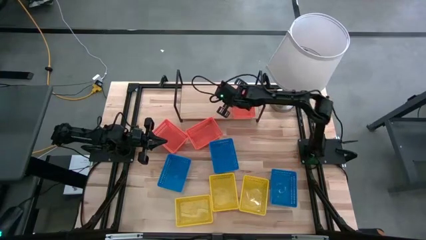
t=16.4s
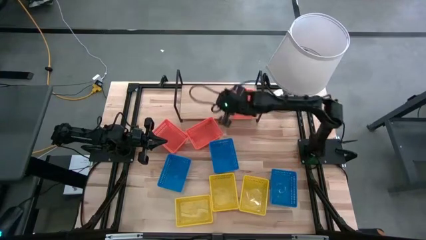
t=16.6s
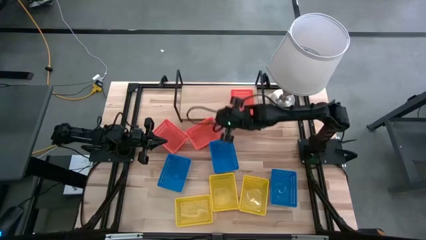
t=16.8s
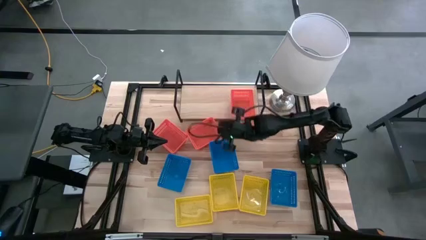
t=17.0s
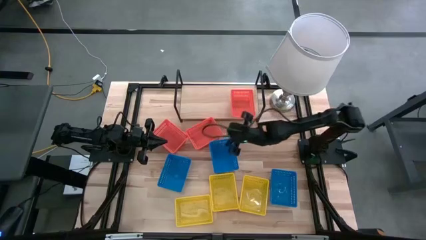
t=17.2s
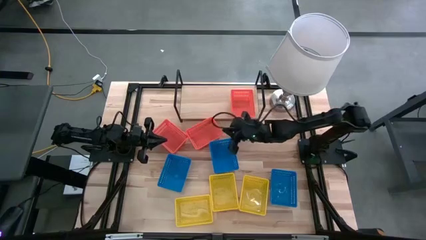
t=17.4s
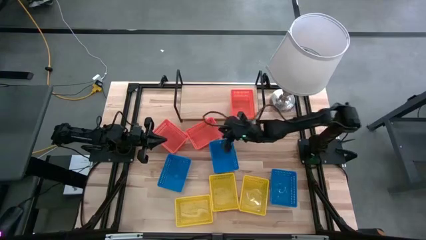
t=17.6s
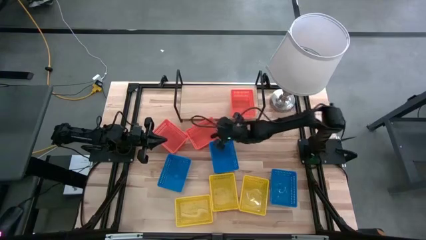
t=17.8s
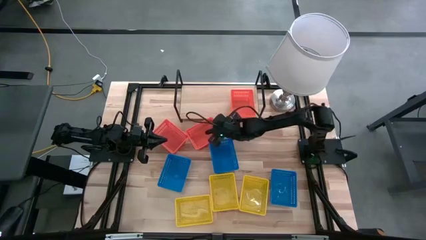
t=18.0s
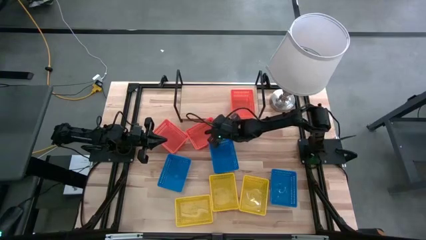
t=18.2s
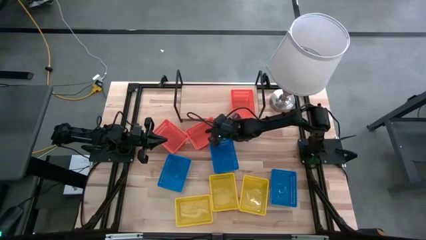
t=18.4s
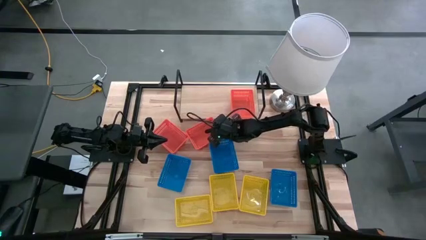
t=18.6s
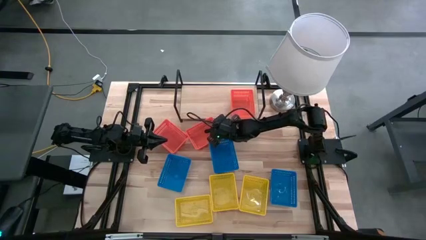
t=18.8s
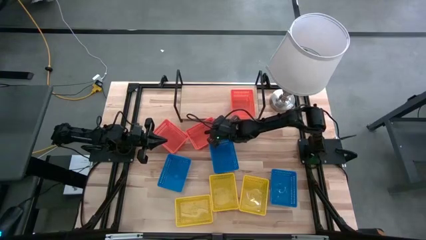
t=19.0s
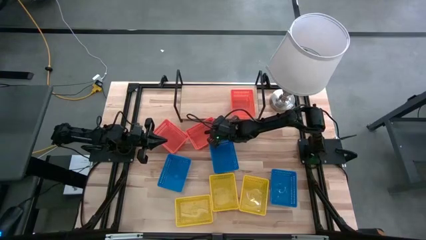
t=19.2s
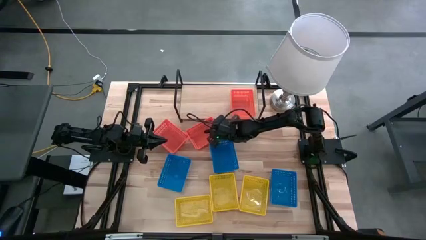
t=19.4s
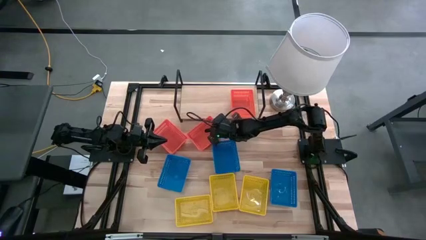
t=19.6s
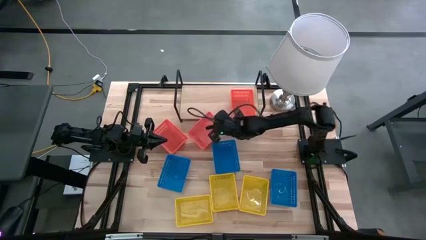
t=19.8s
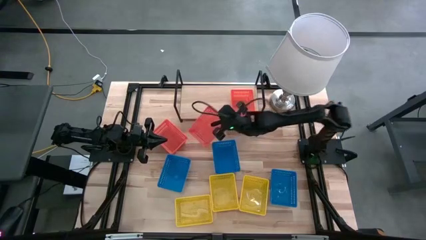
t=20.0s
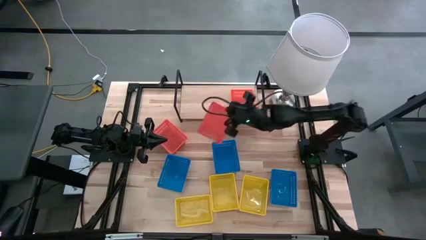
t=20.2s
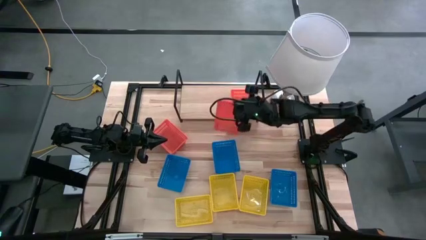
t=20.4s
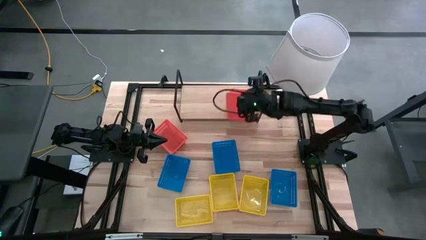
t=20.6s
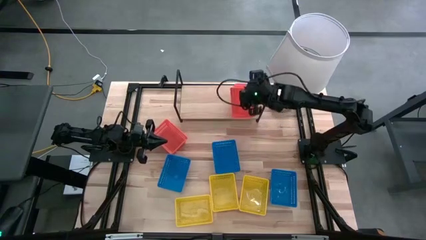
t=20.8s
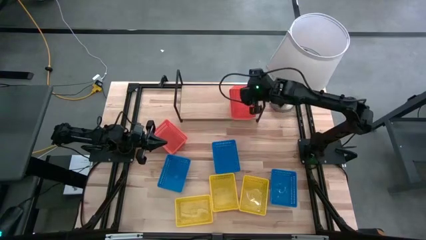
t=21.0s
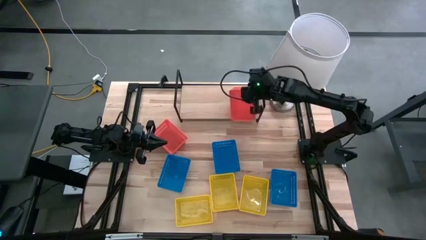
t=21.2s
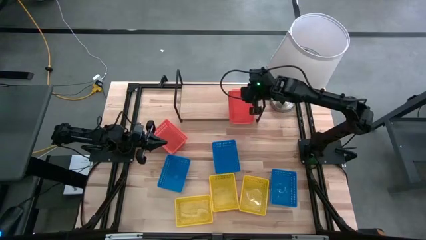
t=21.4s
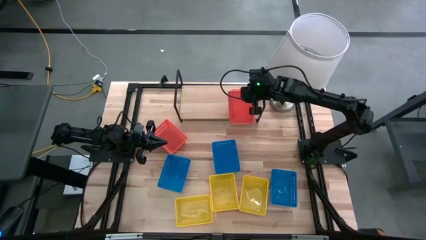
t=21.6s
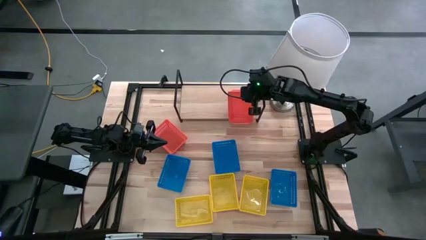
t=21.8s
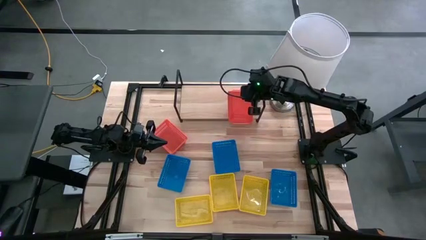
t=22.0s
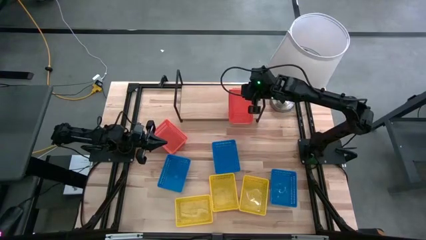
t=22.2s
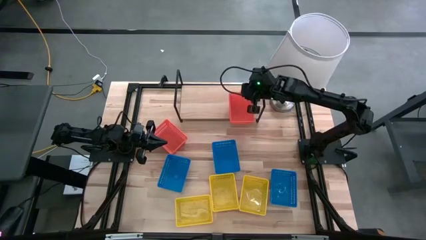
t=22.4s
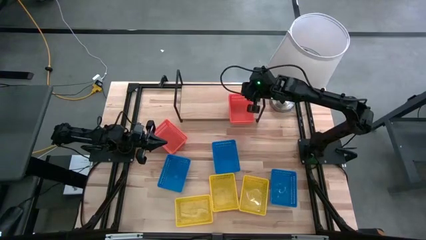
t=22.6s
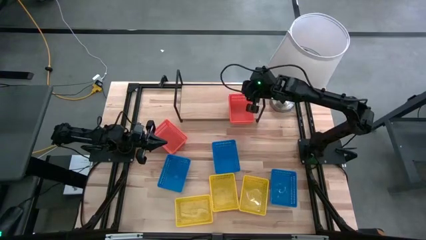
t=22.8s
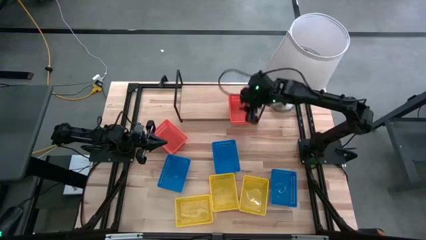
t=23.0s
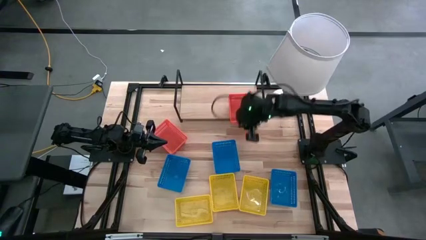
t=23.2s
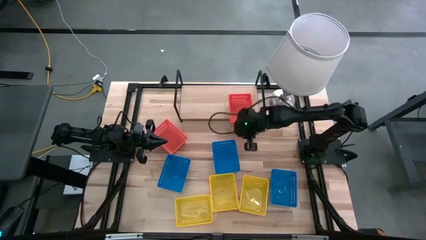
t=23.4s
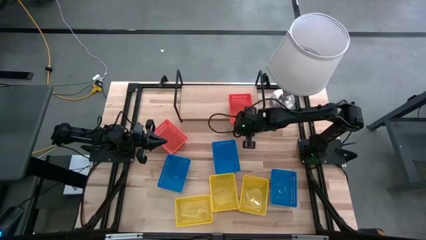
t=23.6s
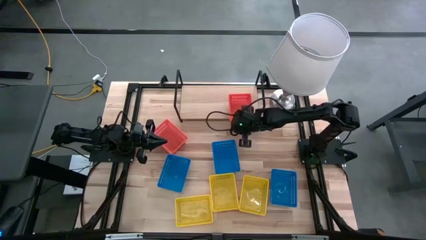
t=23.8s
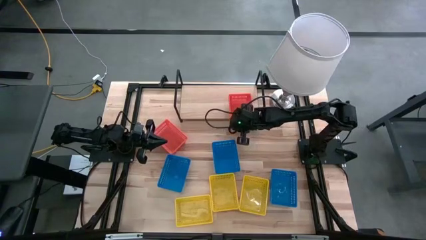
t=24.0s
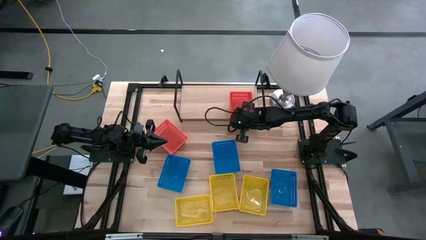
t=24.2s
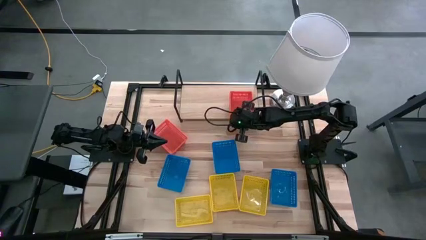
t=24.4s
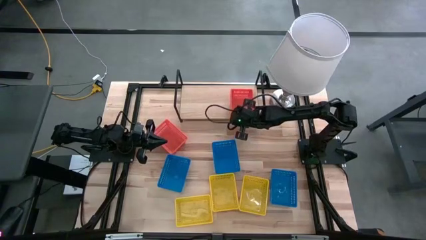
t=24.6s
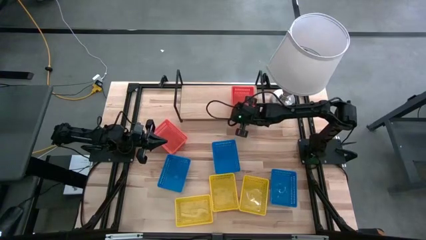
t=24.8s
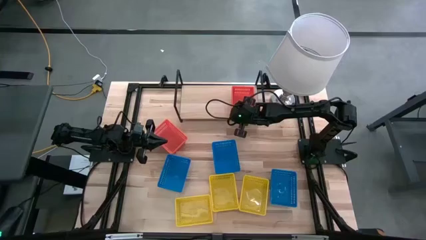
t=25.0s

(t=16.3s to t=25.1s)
Task: Stack baskets on shelf by color
Stack the right orange bin on top of the other orange bin on the shelf

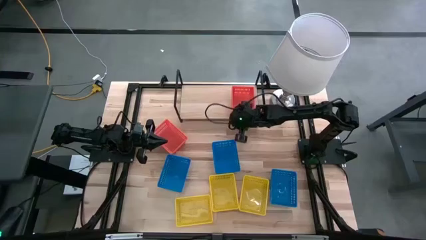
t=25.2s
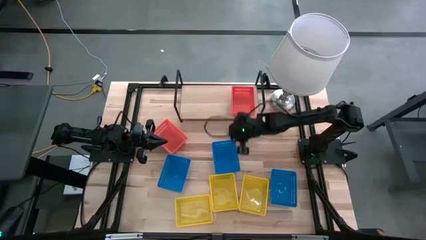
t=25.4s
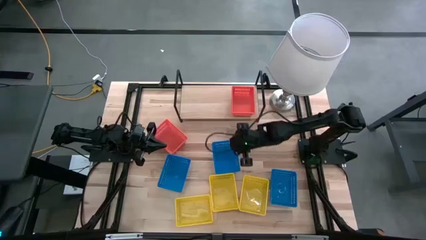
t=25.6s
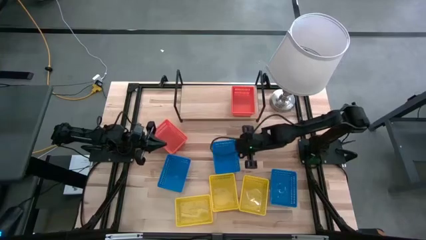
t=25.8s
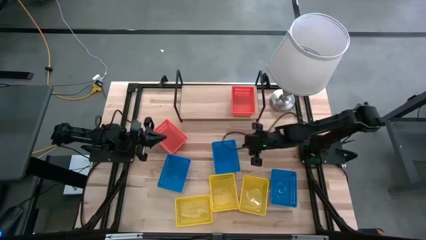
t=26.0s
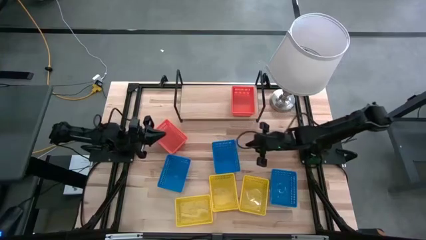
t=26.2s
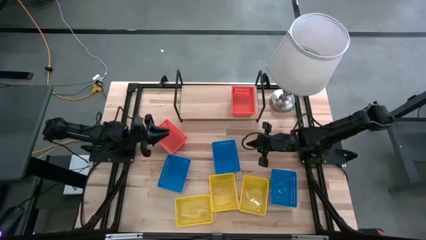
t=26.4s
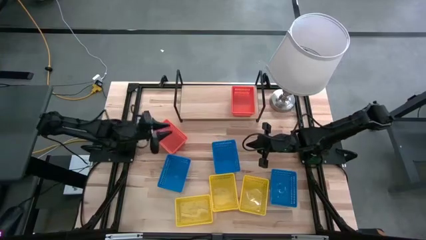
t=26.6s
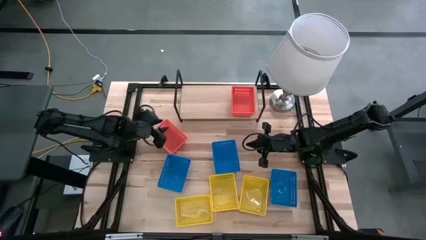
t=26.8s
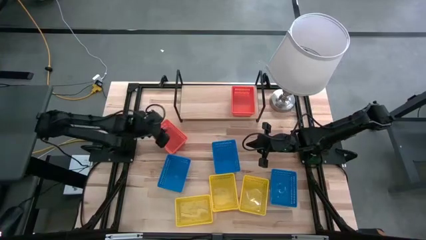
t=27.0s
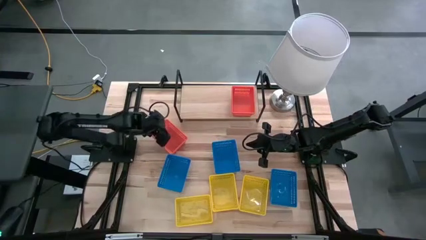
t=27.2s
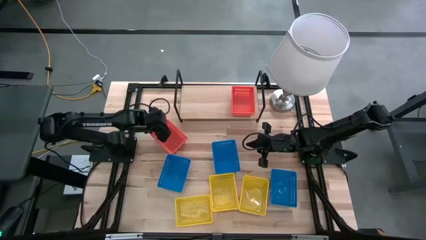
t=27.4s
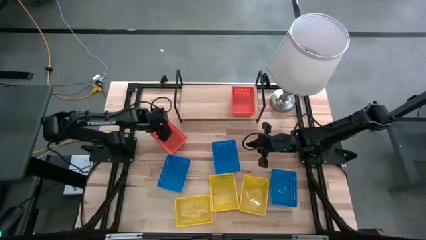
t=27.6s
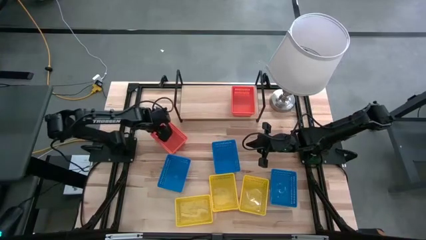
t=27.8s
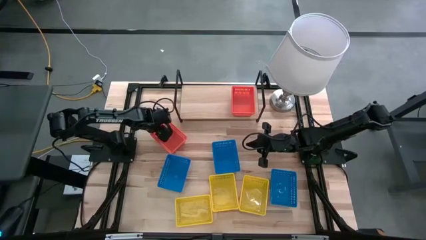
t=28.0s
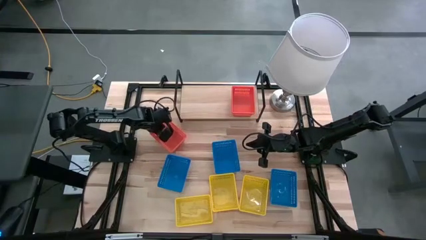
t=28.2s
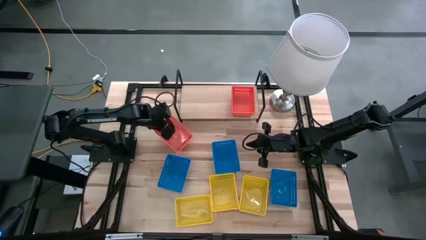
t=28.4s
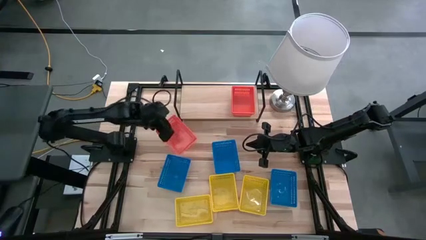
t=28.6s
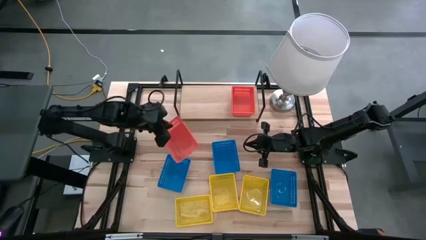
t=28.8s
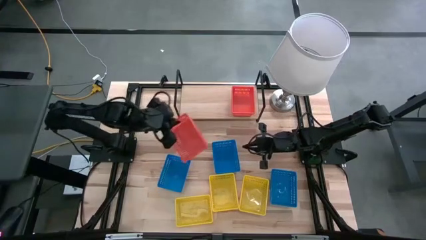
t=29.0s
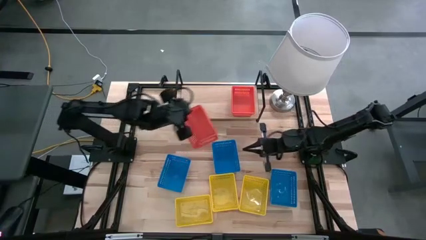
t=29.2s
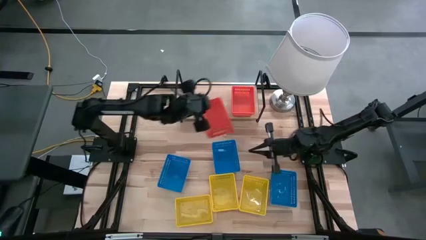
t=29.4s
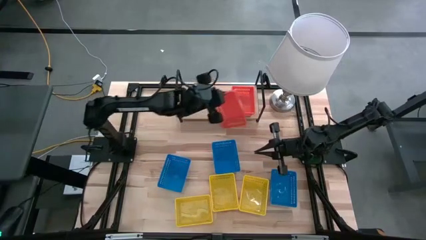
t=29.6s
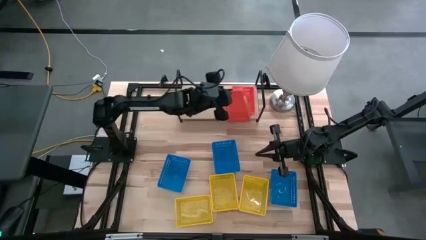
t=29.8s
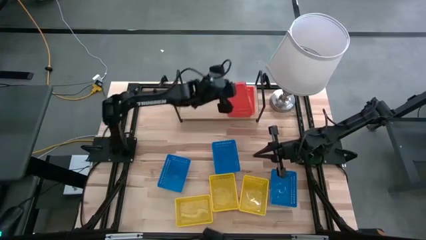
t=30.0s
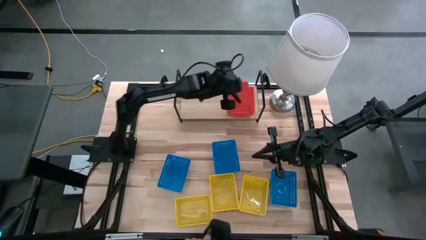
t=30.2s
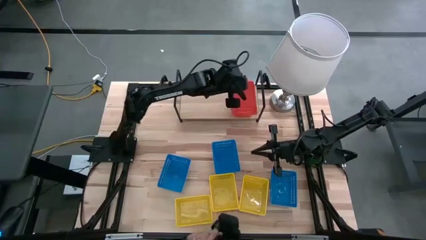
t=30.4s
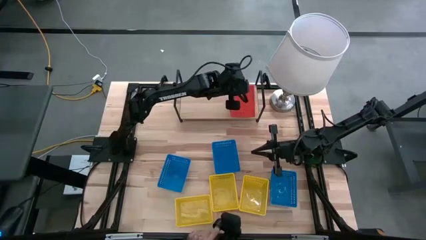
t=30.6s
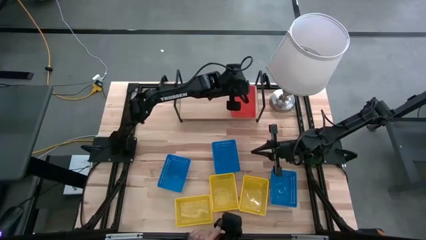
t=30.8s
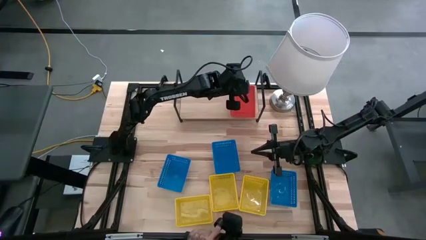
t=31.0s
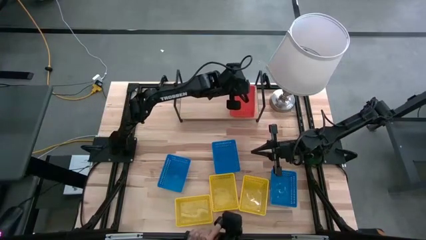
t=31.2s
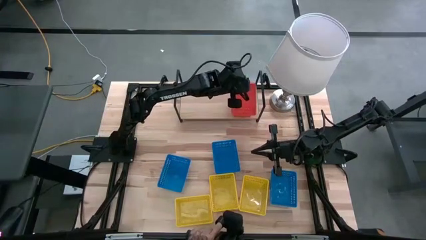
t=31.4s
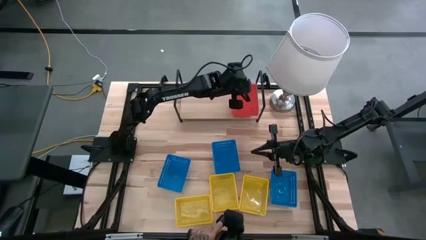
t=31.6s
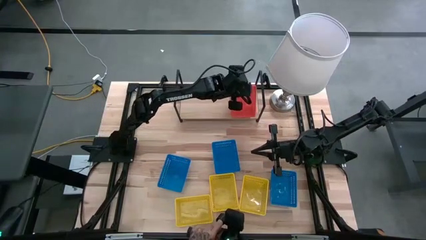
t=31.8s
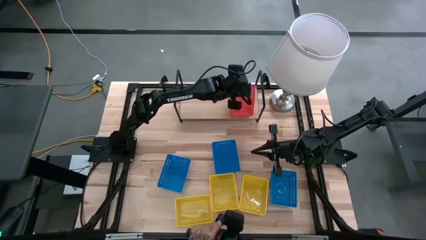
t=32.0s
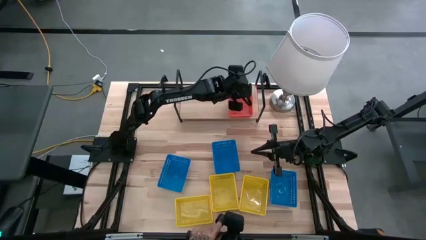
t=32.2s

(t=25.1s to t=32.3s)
Stack the orange bin on top of the other orange bins on the shelf
